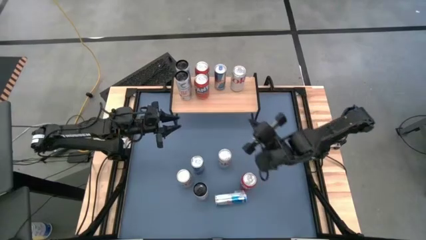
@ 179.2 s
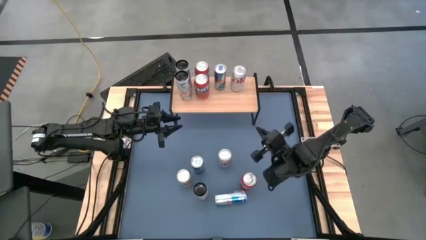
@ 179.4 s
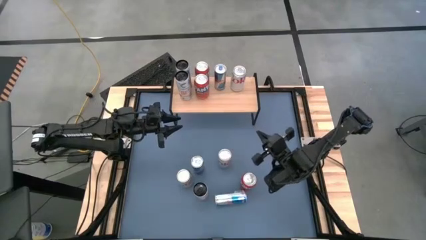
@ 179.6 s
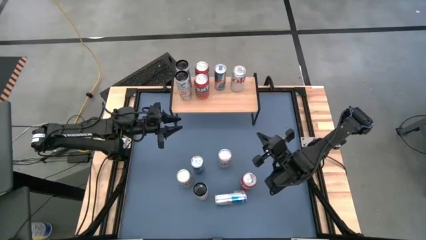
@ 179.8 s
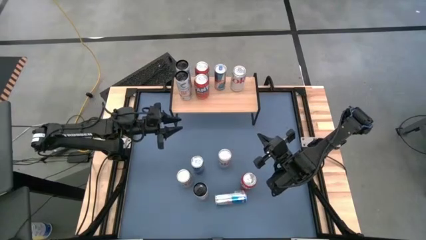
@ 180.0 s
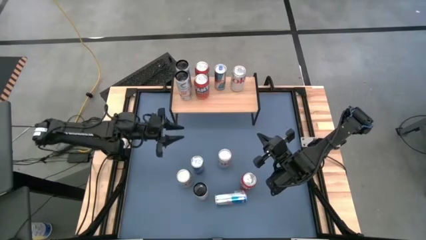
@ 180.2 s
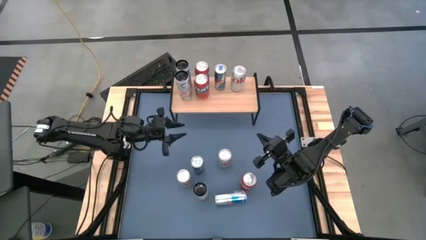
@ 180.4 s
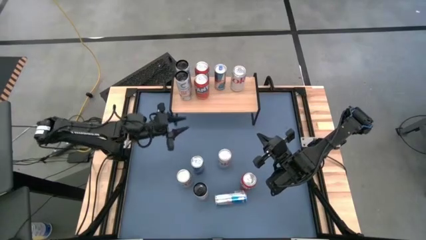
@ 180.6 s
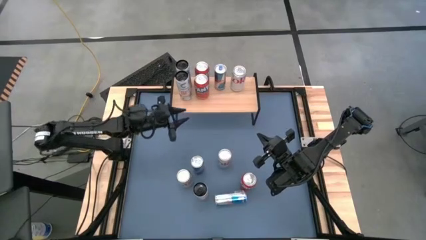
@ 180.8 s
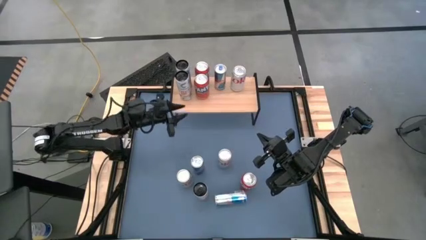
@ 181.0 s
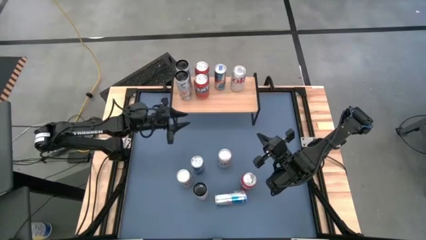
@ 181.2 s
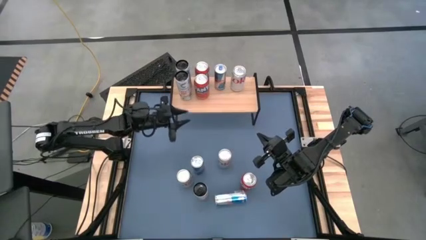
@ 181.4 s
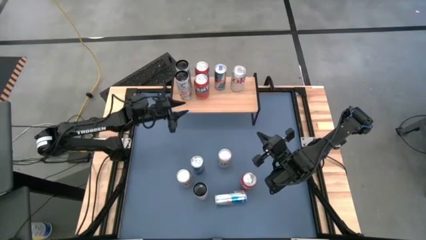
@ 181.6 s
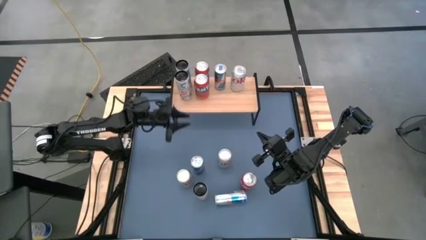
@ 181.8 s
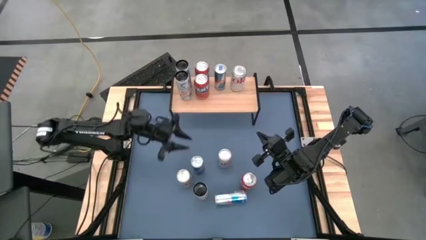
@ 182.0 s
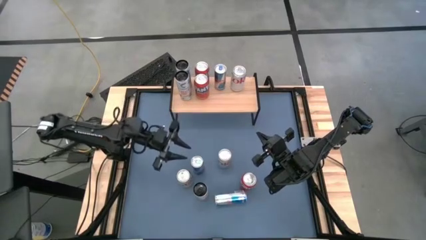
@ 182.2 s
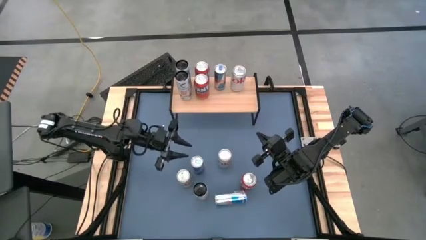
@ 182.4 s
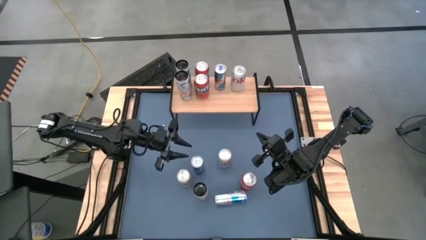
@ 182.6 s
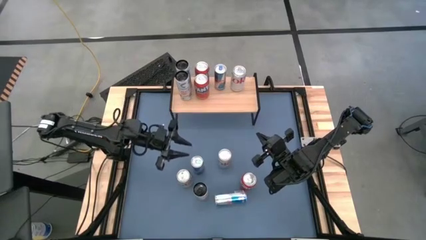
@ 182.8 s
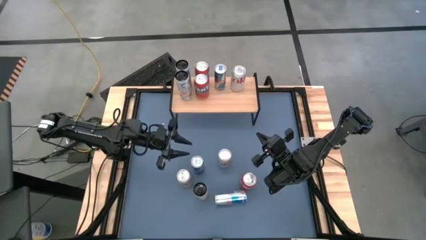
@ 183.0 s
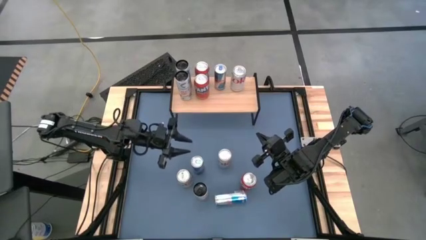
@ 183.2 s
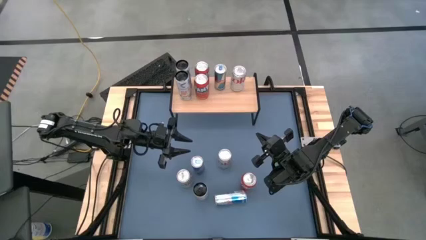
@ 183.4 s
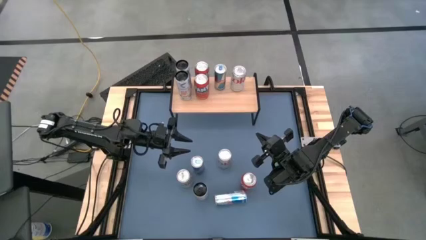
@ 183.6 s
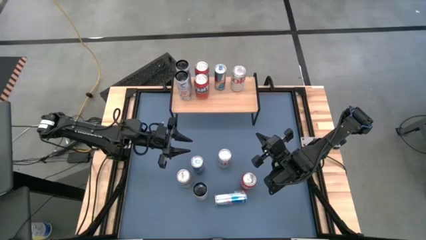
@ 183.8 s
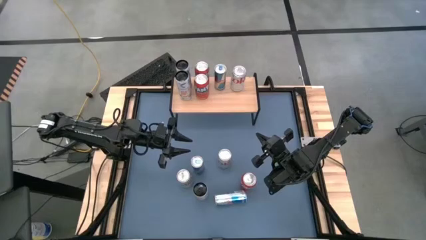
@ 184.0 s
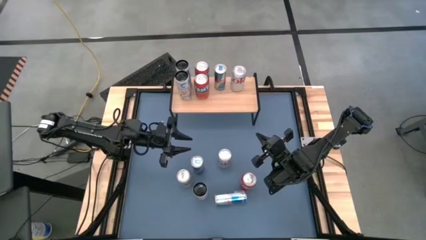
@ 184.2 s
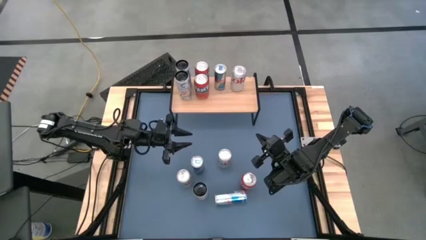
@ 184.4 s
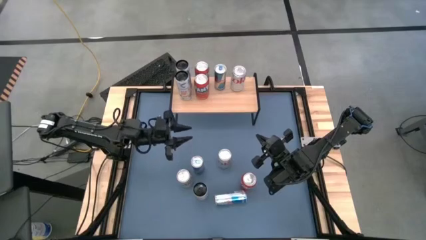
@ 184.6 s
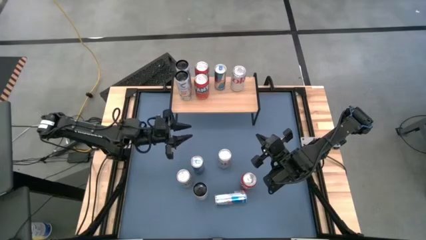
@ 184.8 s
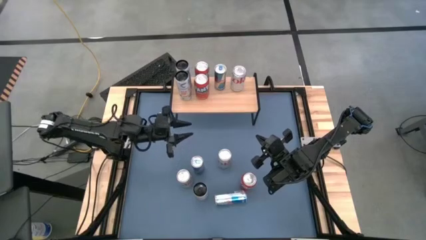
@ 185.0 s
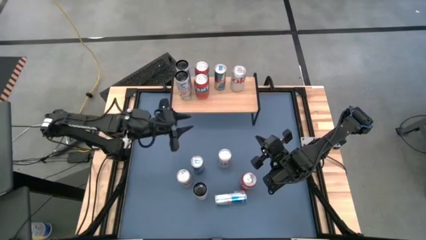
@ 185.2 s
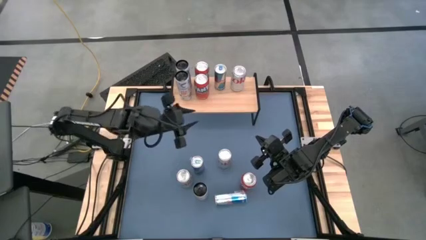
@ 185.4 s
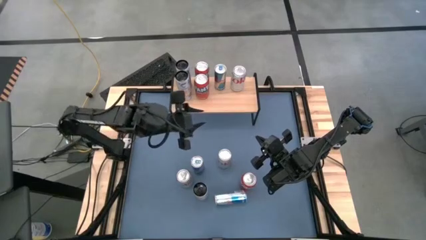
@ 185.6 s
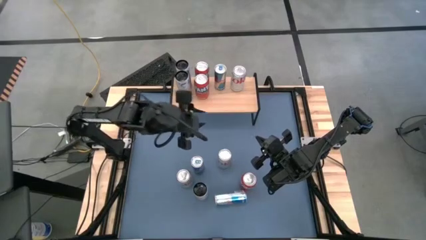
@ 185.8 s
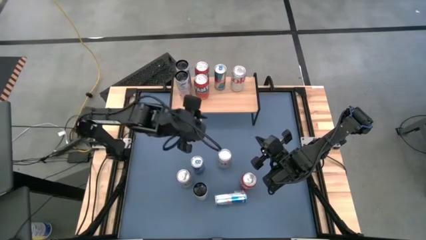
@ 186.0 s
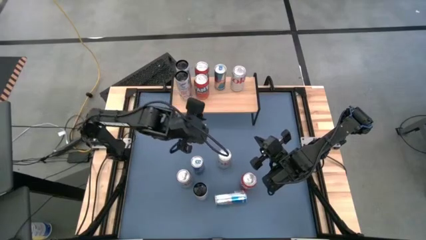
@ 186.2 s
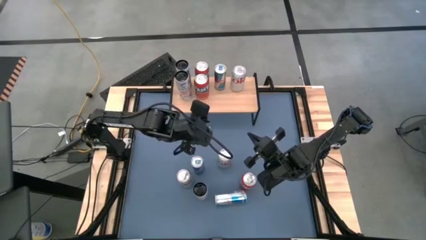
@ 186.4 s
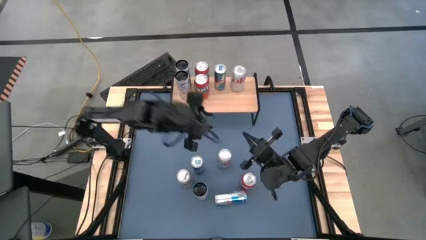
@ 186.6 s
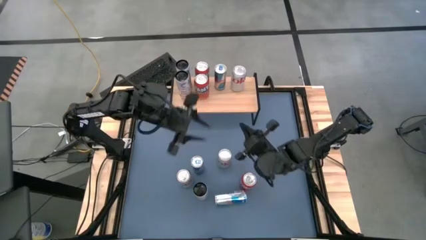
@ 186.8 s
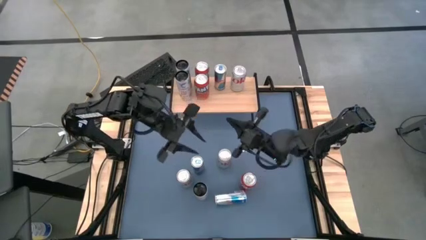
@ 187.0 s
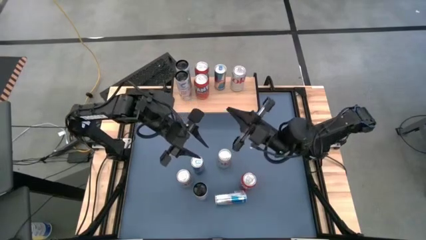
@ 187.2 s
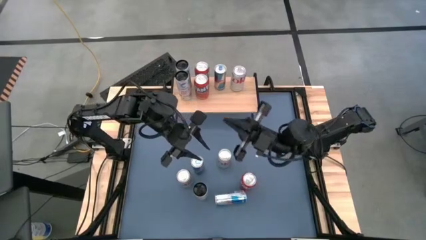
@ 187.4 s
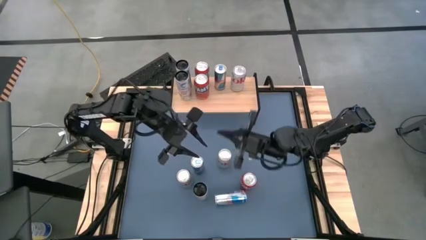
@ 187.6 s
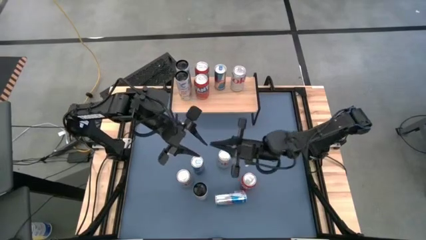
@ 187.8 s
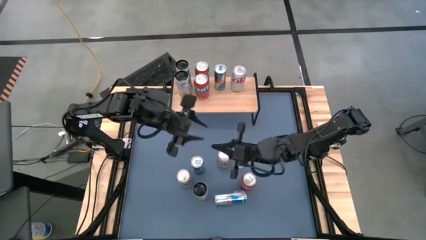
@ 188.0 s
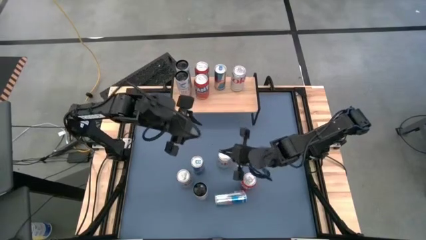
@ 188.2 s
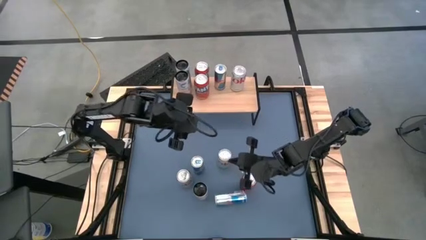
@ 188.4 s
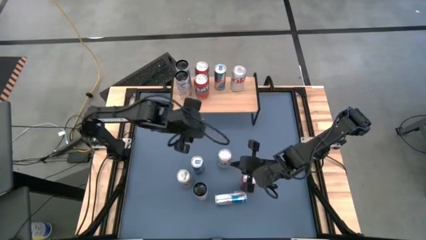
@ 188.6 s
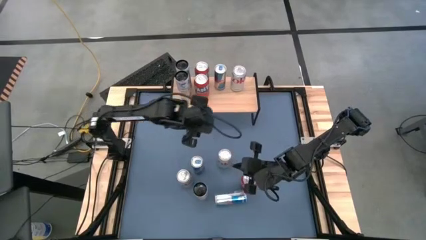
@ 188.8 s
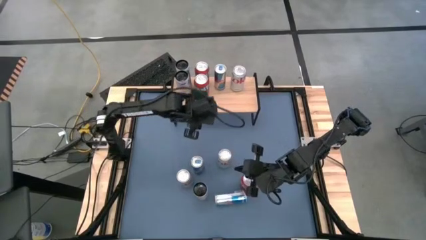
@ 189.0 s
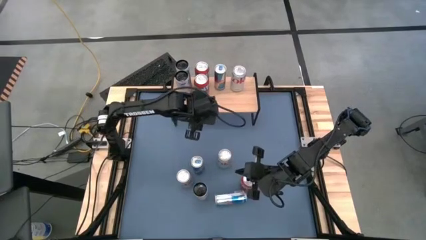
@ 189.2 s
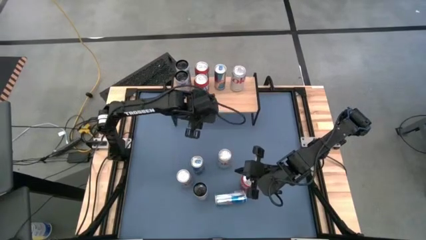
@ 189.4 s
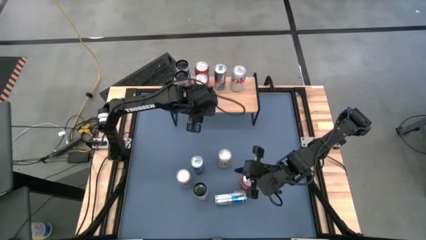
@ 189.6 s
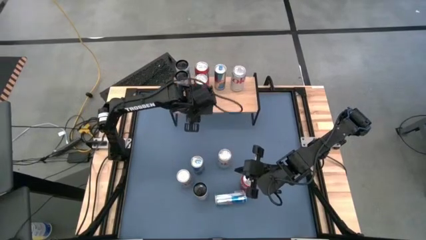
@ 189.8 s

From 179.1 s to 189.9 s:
Task: Place canned beverage on shelf
Put the top blue soda can on the shelf

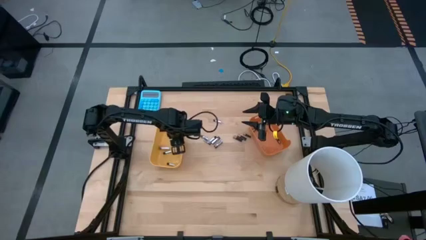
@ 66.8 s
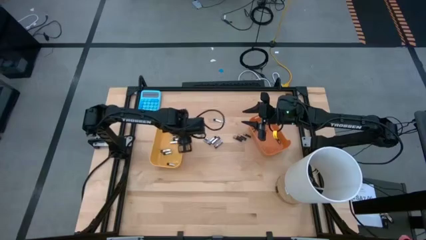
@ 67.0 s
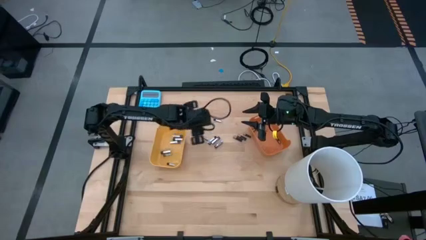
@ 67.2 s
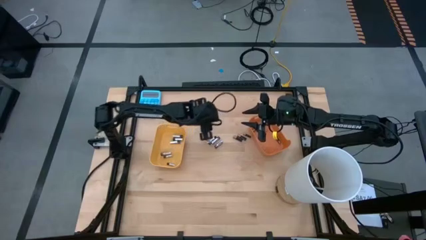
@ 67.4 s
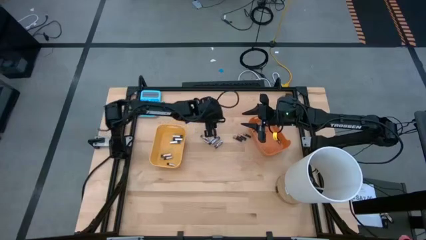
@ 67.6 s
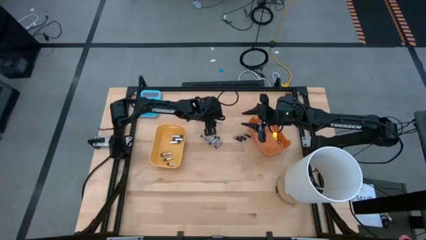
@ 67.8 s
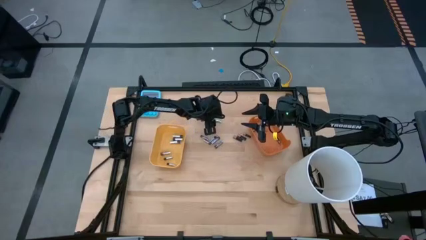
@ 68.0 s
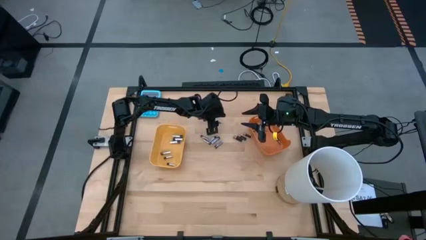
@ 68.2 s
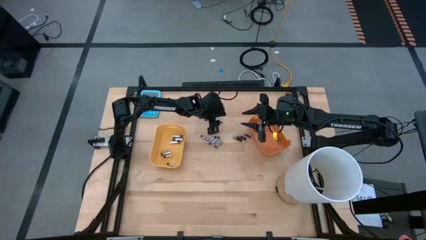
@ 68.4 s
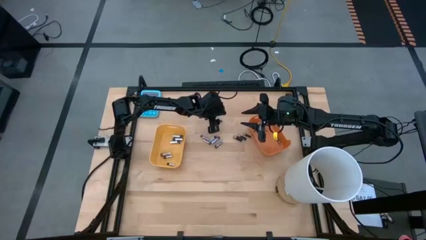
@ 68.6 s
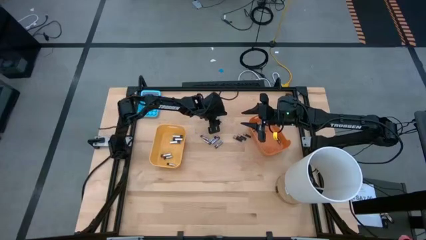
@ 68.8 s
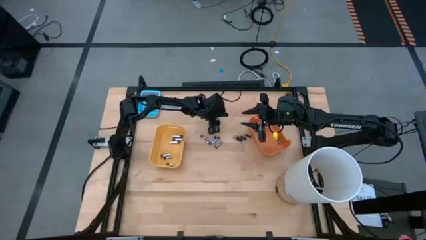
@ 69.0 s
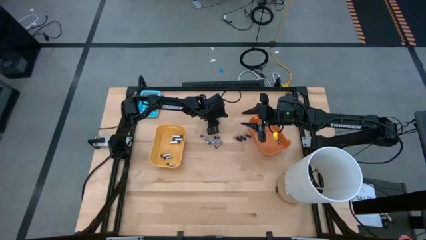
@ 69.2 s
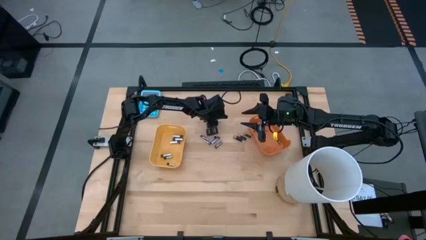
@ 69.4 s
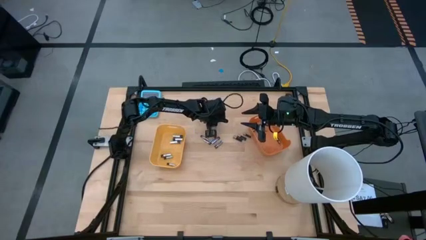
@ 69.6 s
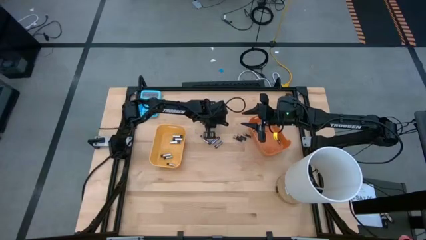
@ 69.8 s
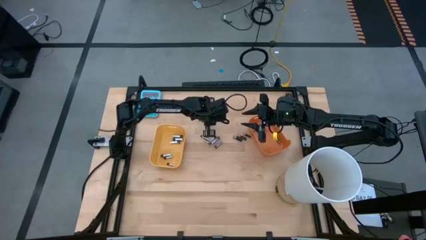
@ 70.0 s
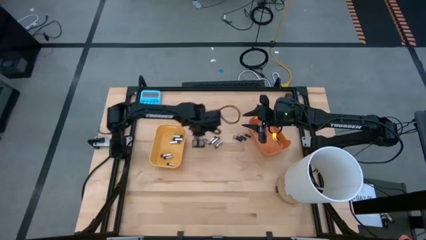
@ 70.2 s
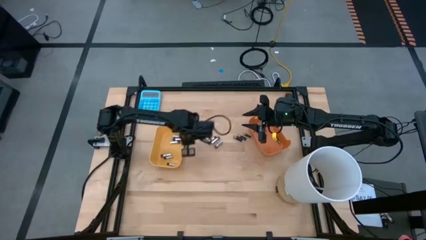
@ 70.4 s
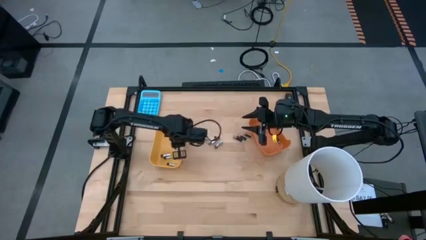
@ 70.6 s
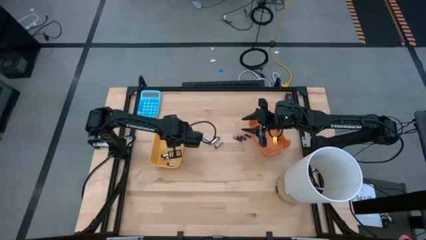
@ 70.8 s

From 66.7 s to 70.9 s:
Task: Sort batteries
Put the silver battery into the yellow bin

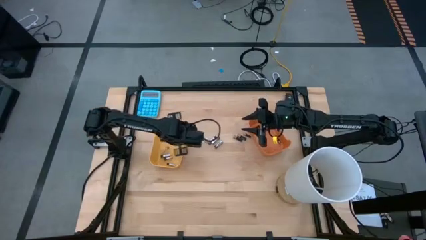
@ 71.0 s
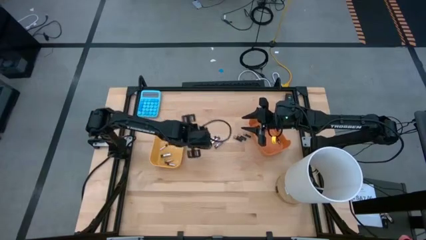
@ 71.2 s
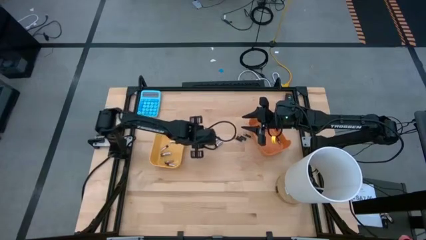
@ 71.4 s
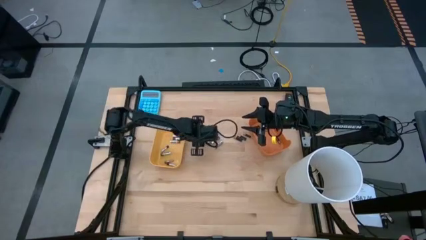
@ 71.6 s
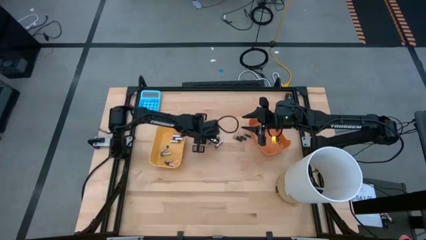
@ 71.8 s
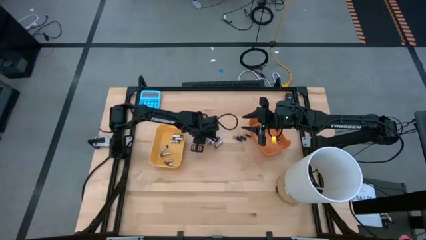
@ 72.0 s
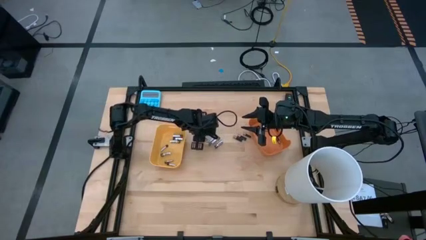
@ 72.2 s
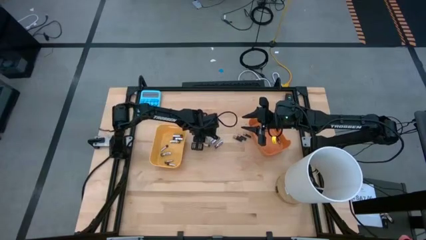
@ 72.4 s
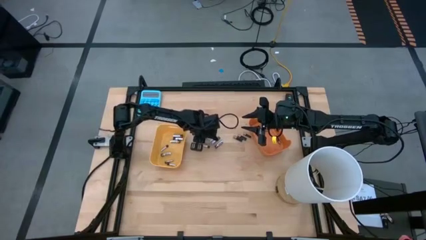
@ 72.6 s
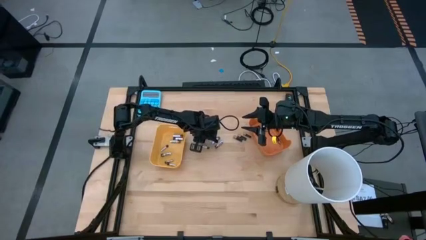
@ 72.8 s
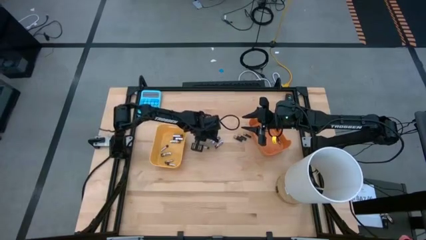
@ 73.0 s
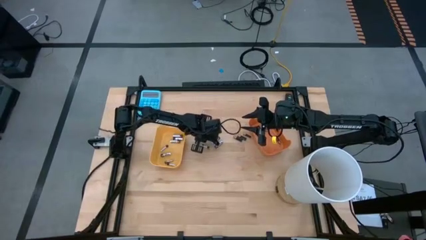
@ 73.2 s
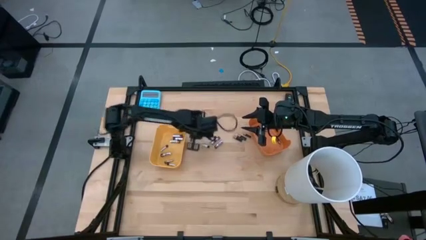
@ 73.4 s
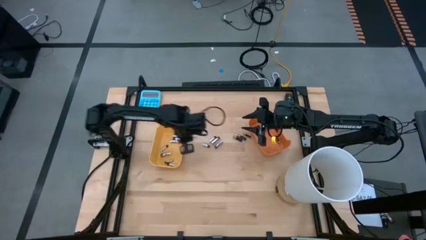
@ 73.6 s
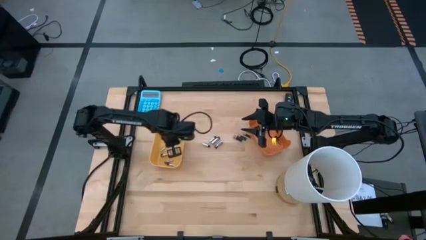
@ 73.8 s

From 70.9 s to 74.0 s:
Put the silver battery into the yellow bin
